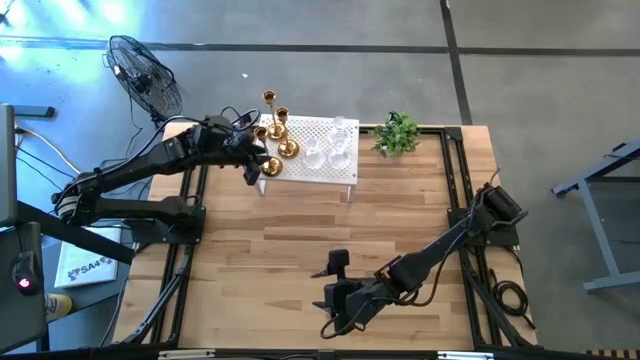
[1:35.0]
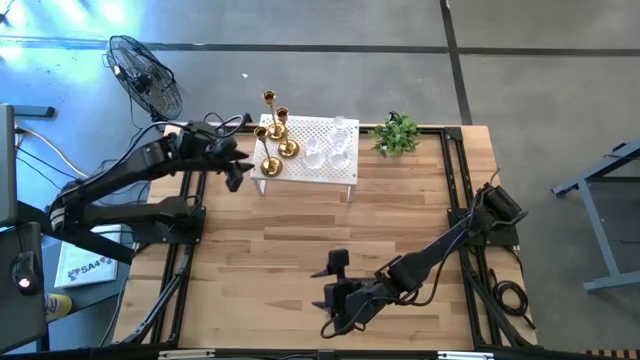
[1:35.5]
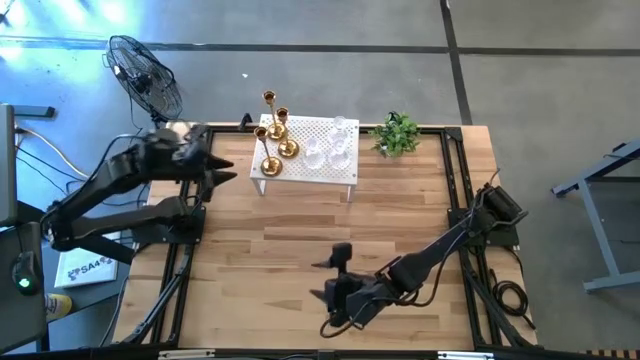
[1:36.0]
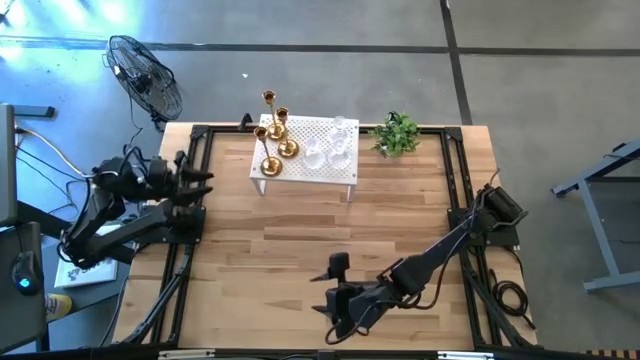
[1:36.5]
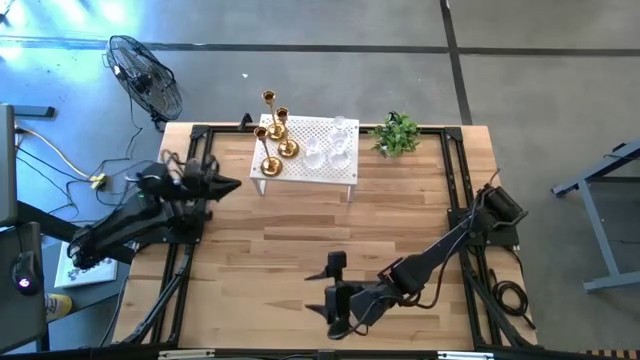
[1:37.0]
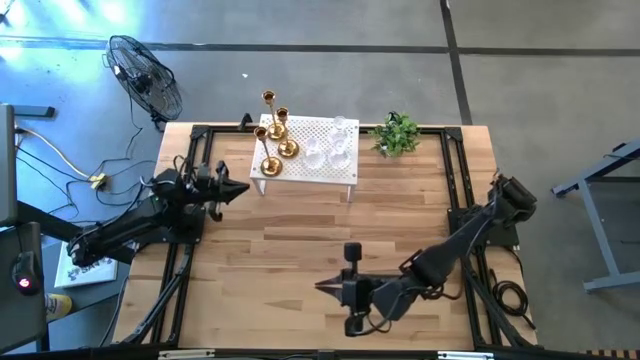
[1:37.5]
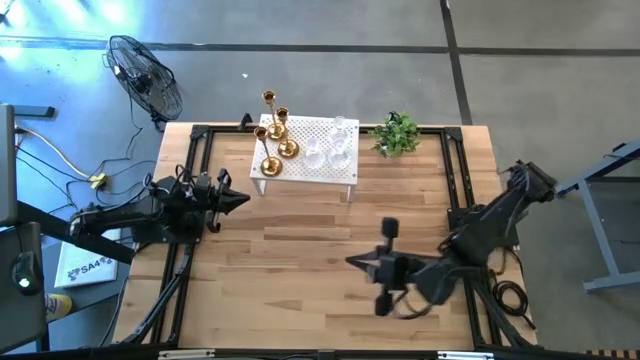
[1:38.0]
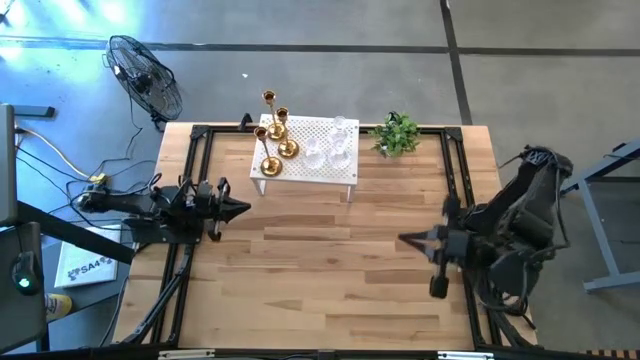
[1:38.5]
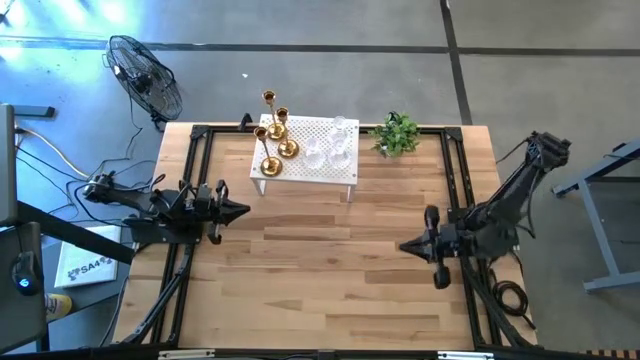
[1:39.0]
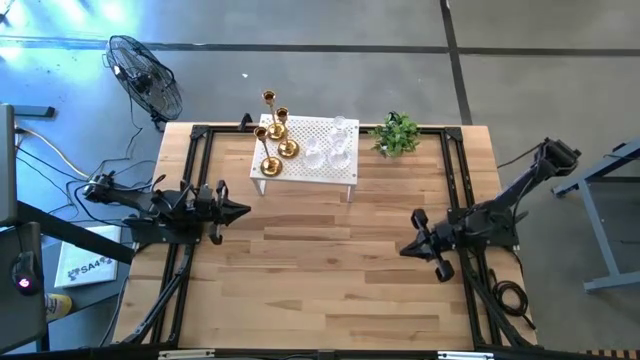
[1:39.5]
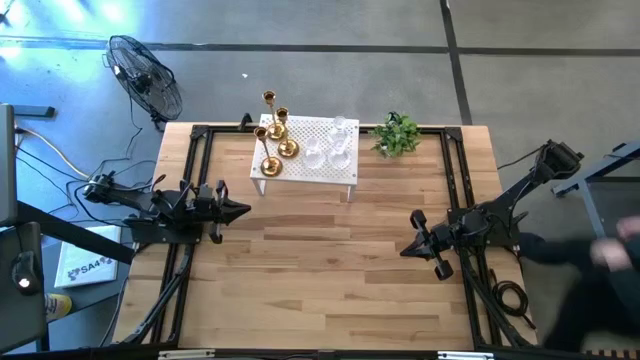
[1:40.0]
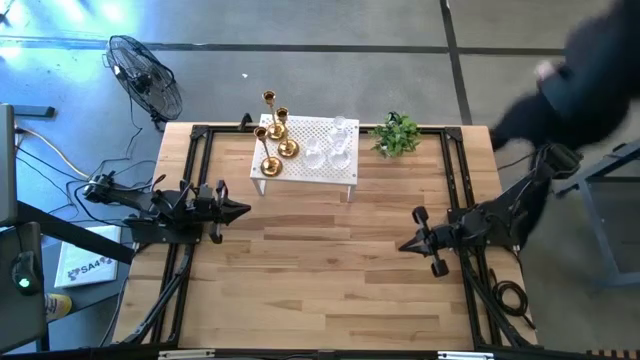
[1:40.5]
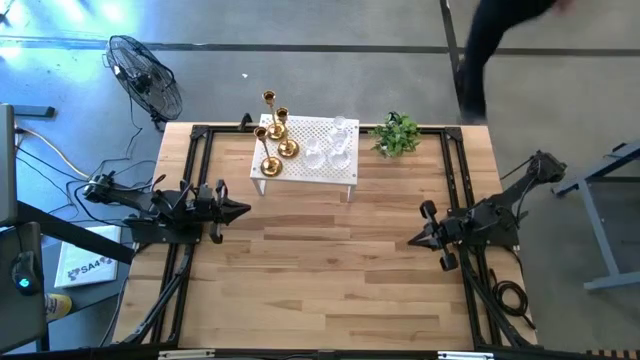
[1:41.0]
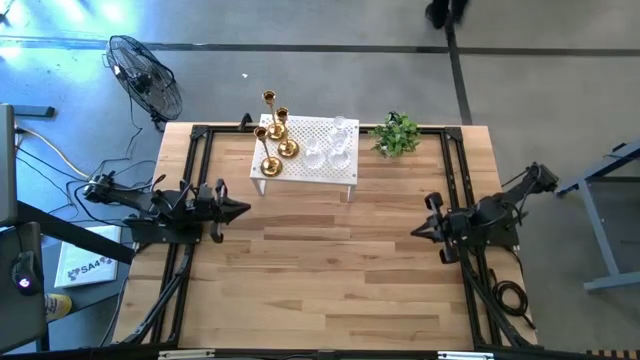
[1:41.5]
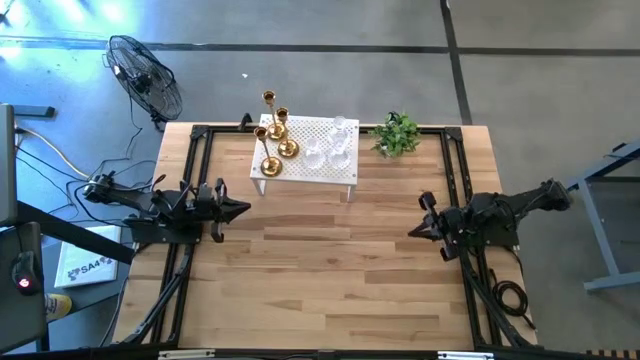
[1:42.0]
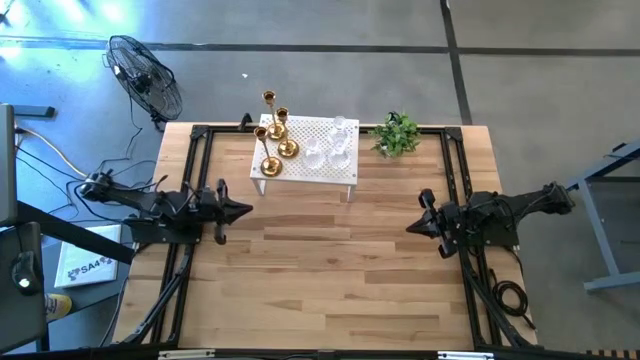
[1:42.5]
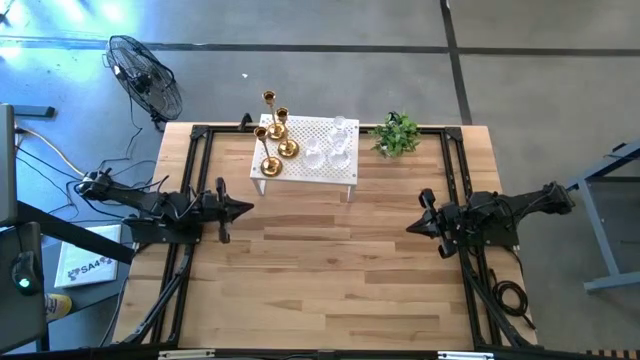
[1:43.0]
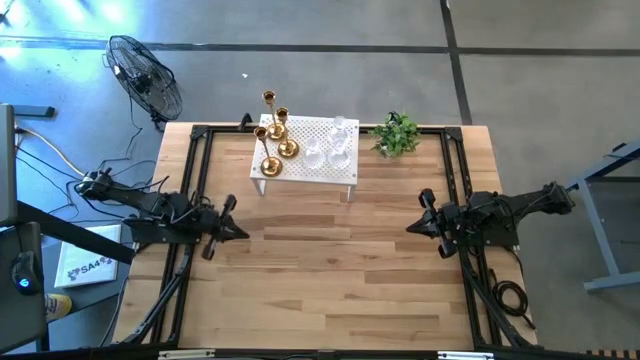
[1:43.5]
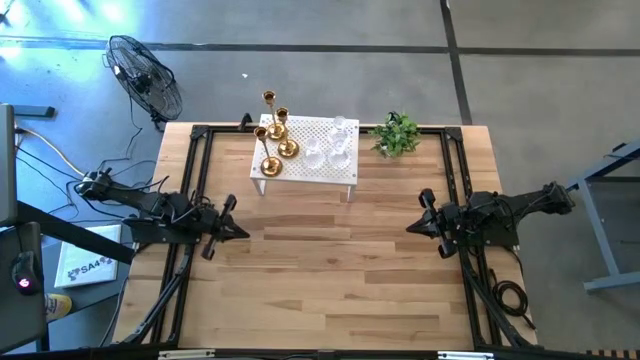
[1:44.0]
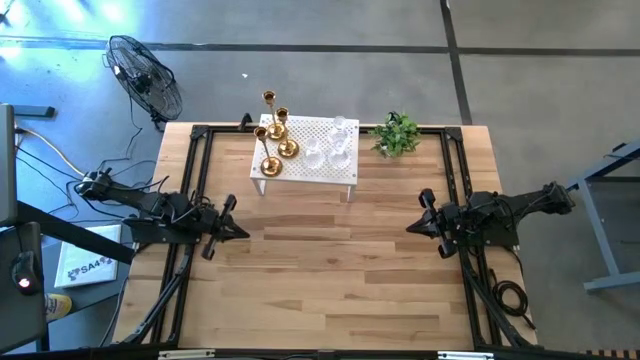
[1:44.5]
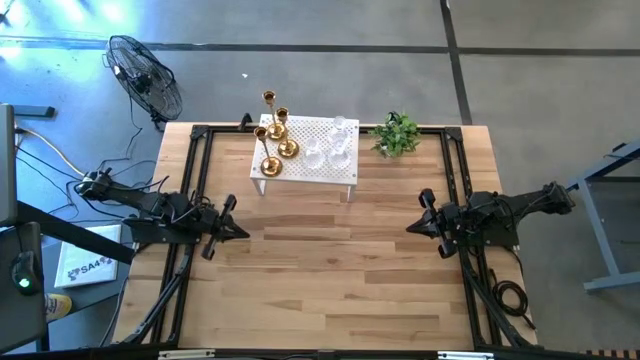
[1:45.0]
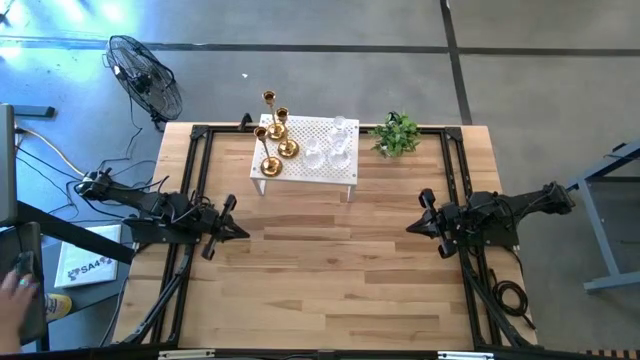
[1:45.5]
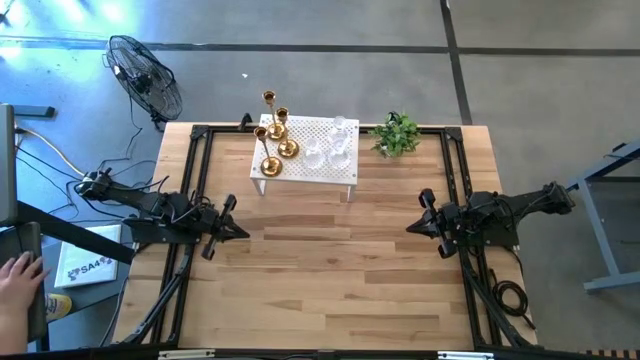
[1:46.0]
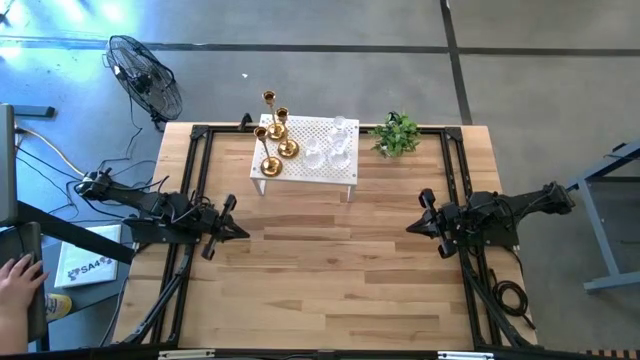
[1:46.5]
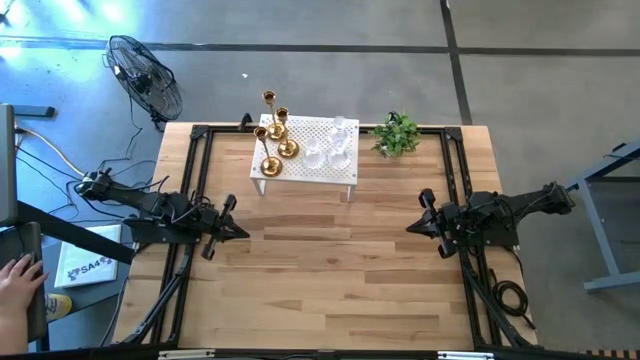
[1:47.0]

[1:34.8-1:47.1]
Task: Pick & Place candle stick holders
Return to Home Position

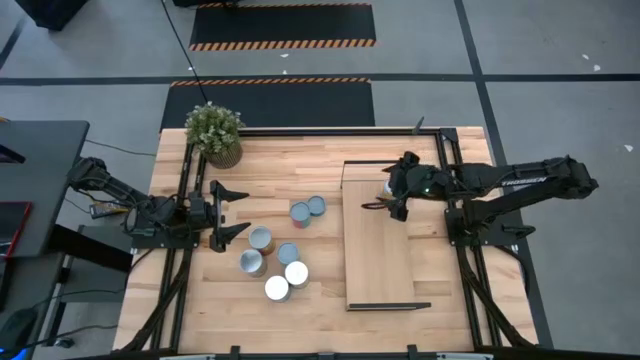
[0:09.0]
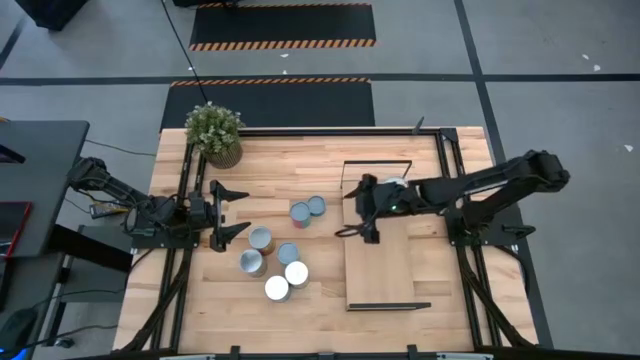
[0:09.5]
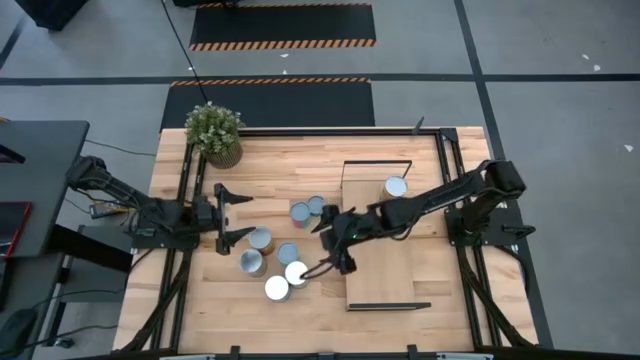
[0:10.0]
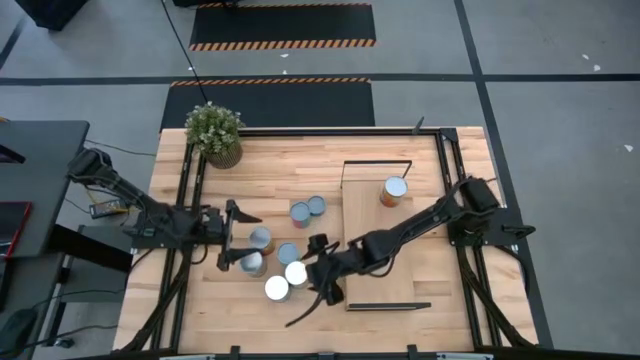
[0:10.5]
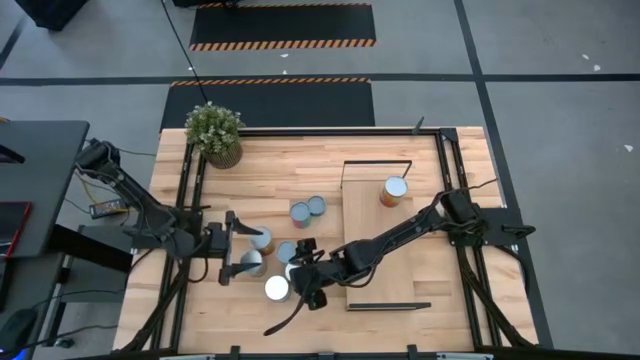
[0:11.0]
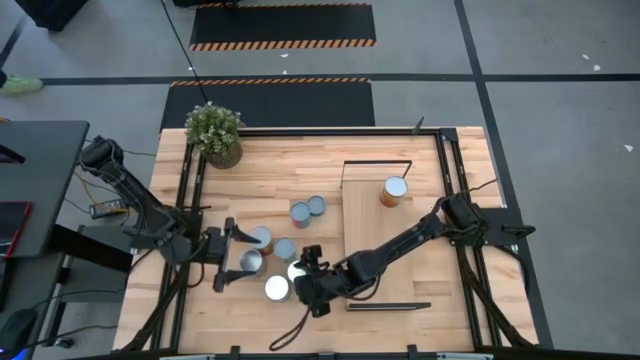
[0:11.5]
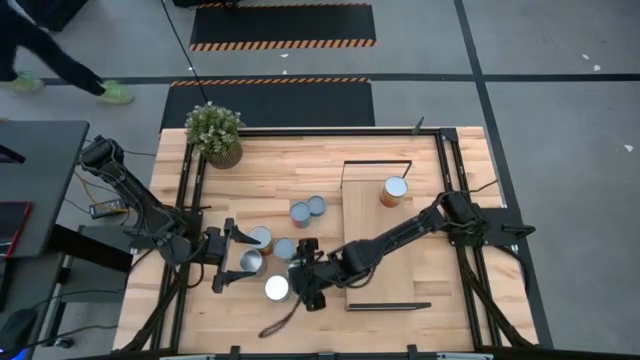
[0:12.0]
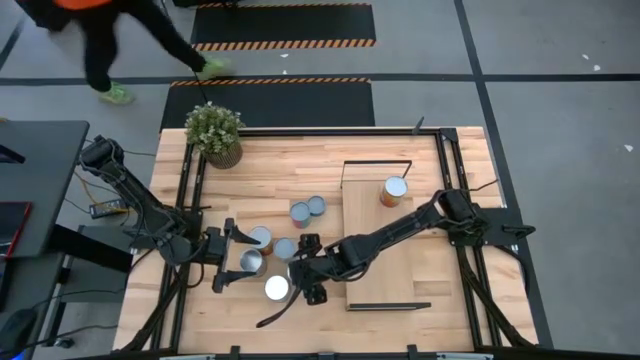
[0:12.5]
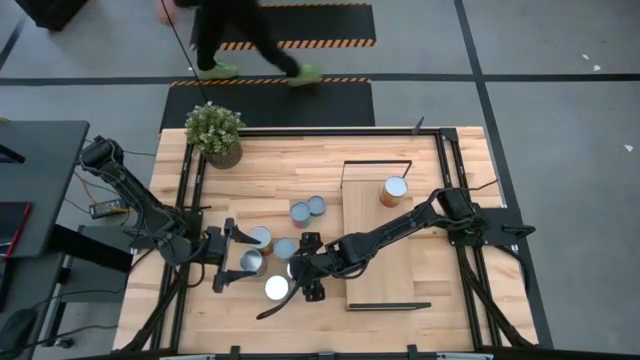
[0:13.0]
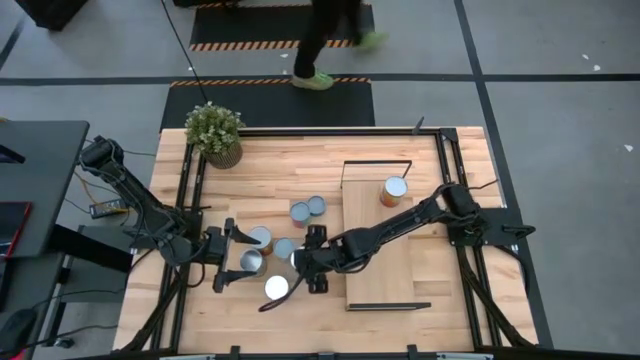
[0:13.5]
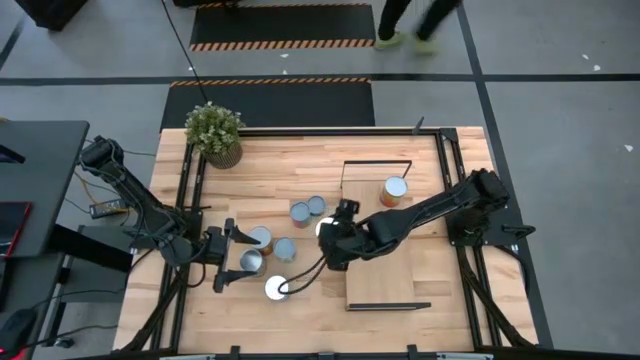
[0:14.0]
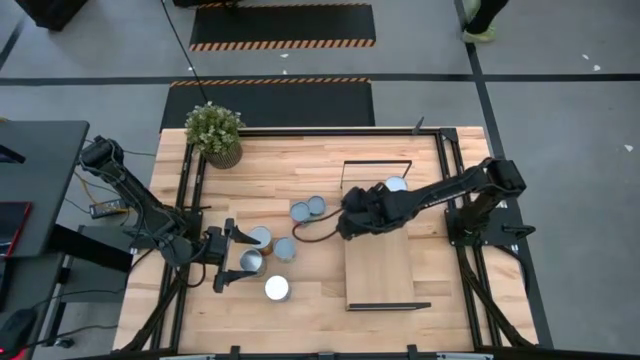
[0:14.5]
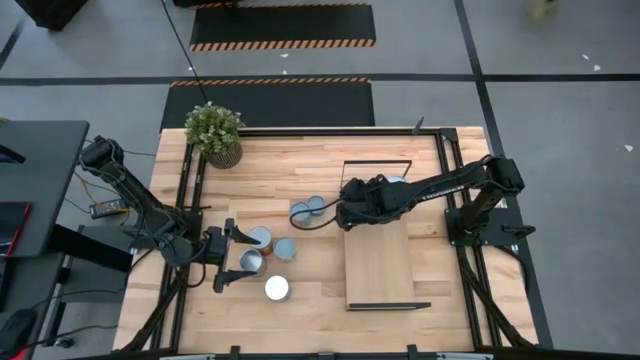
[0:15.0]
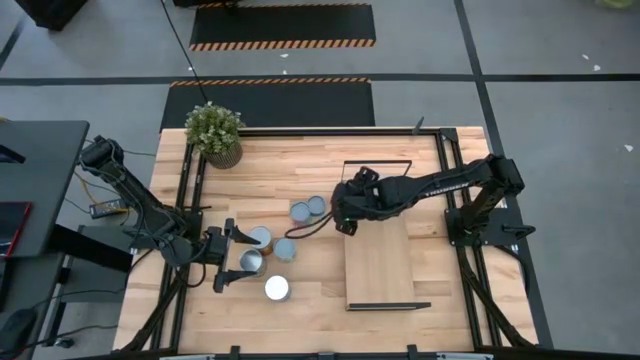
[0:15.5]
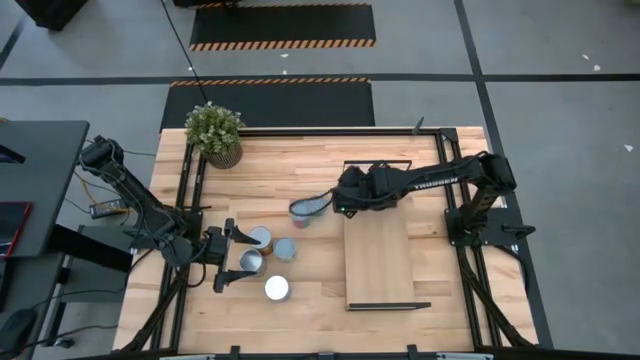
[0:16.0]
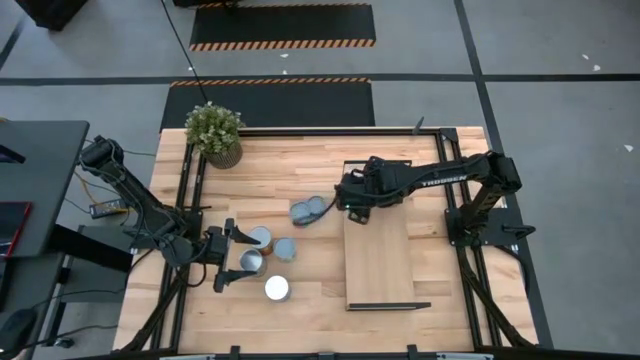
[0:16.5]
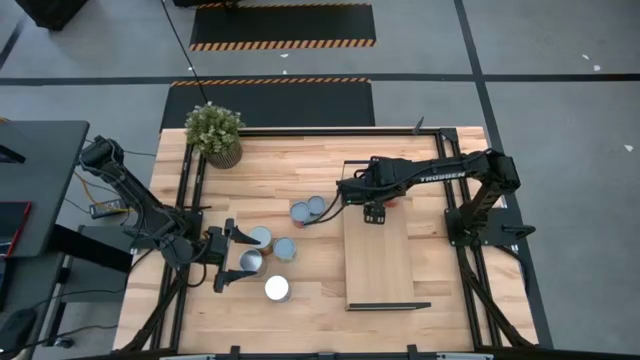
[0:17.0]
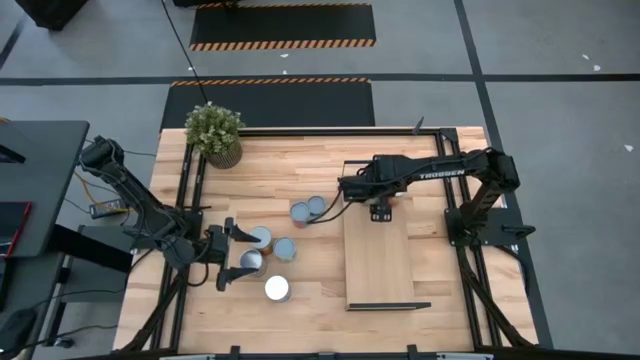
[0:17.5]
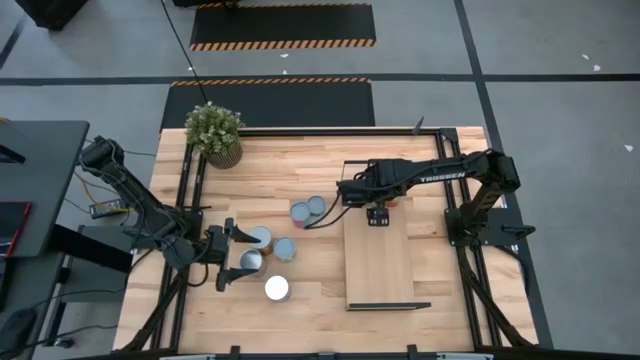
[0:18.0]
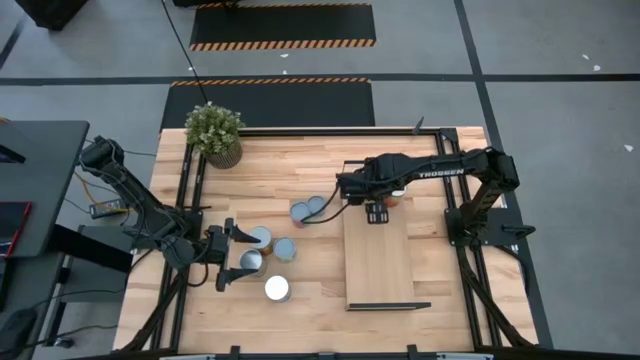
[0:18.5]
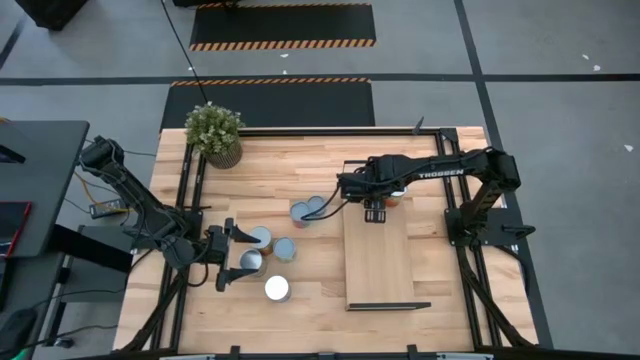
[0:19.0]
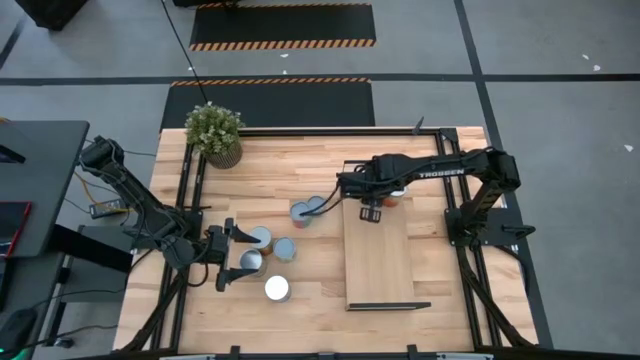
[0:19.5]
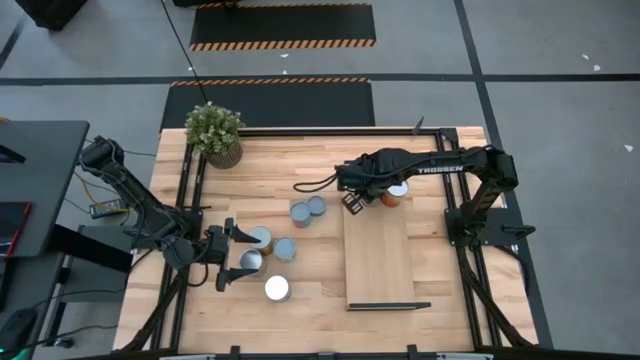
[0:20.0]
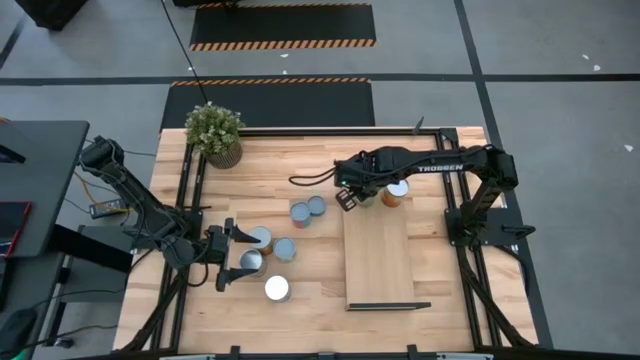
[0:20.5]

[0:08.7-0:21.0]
Task: Pick and place cans onto a shelf
Put the canned oranges on the shelf
